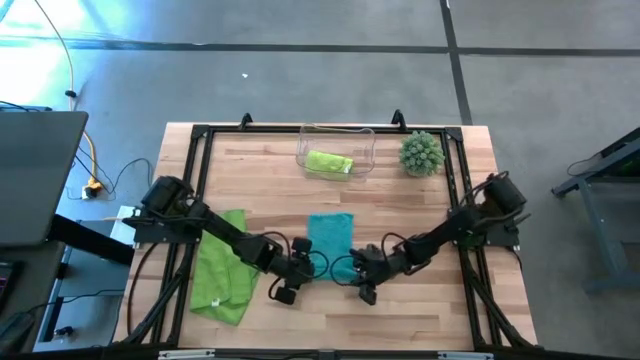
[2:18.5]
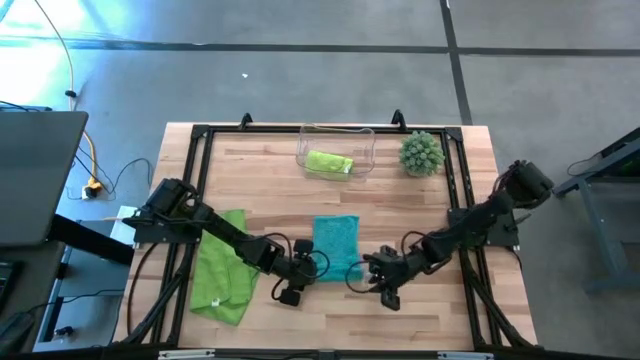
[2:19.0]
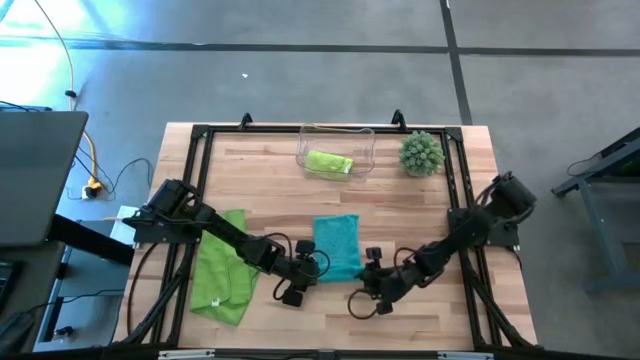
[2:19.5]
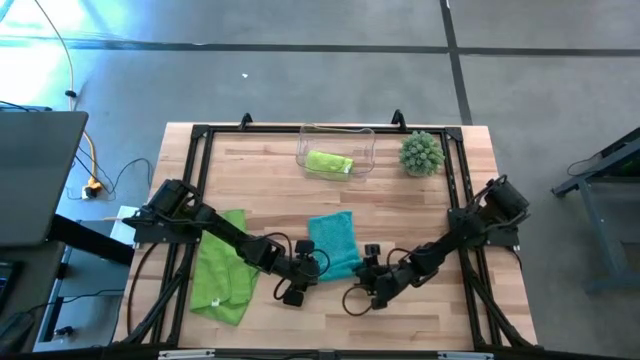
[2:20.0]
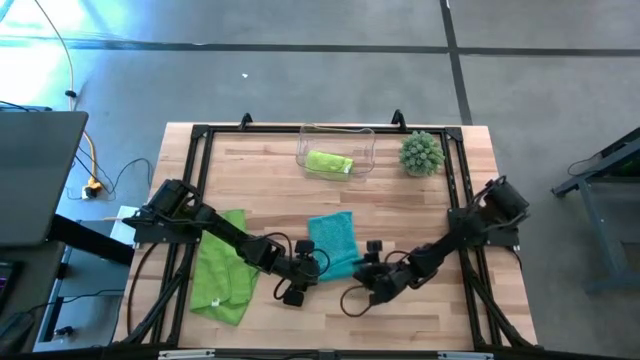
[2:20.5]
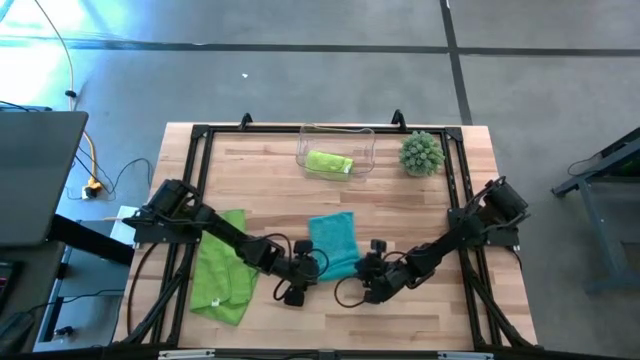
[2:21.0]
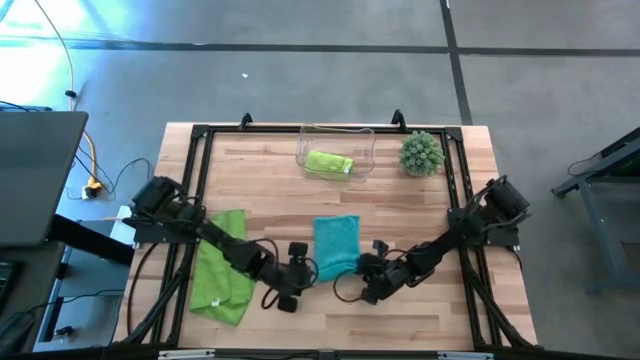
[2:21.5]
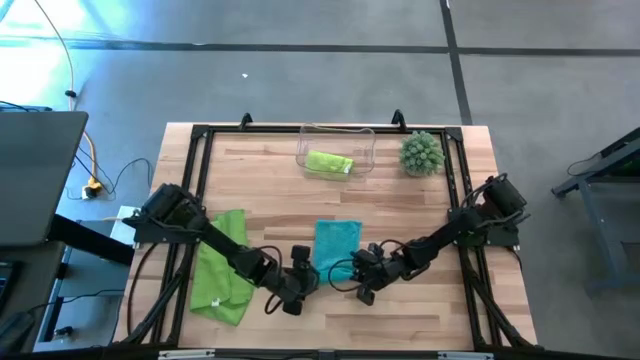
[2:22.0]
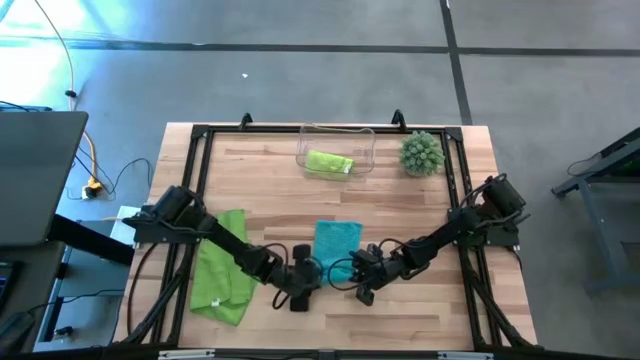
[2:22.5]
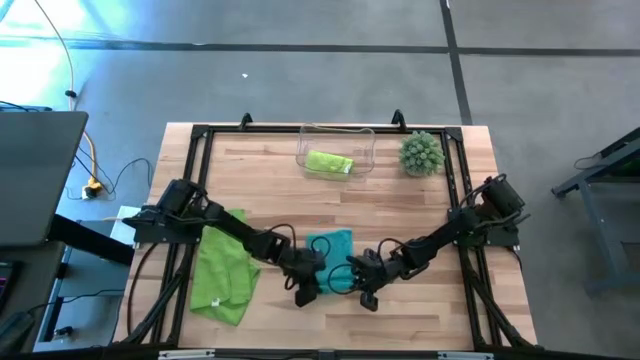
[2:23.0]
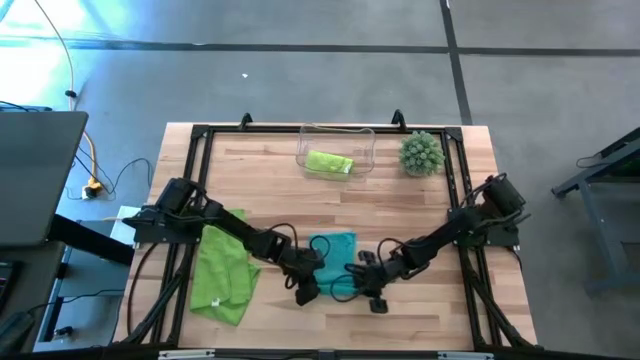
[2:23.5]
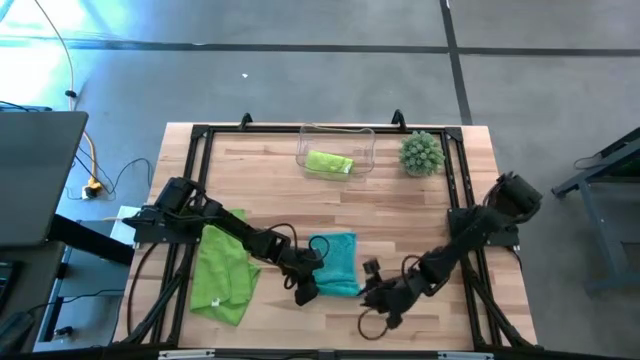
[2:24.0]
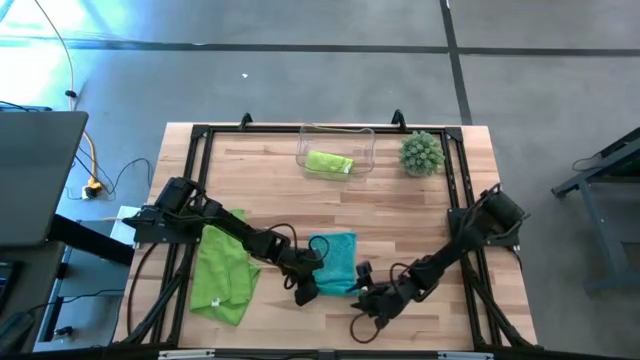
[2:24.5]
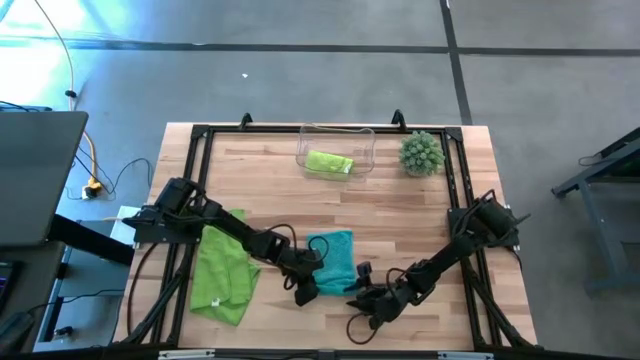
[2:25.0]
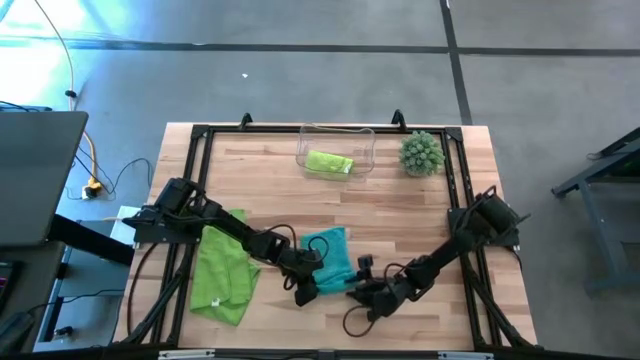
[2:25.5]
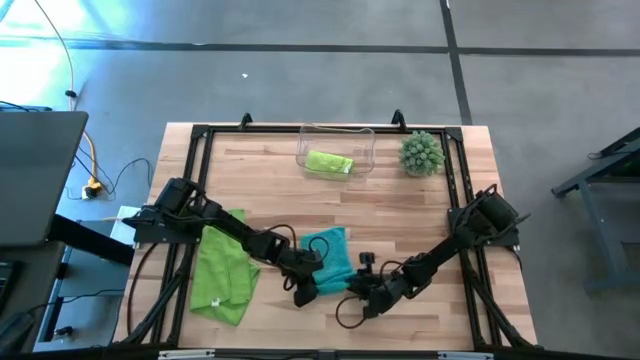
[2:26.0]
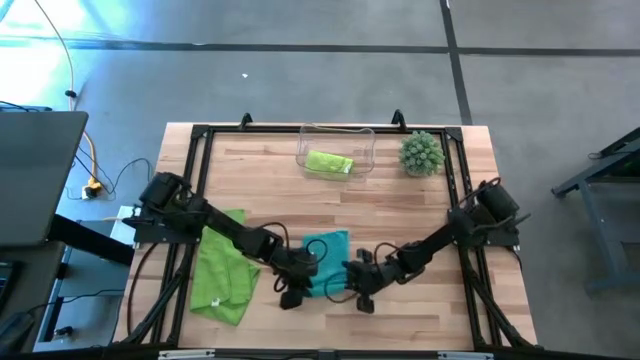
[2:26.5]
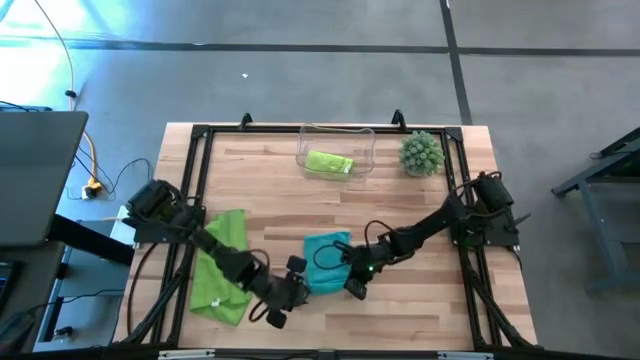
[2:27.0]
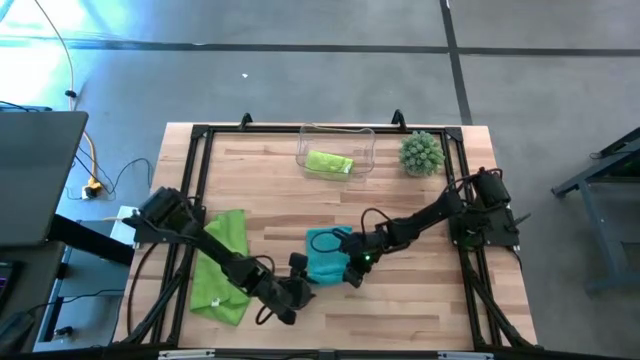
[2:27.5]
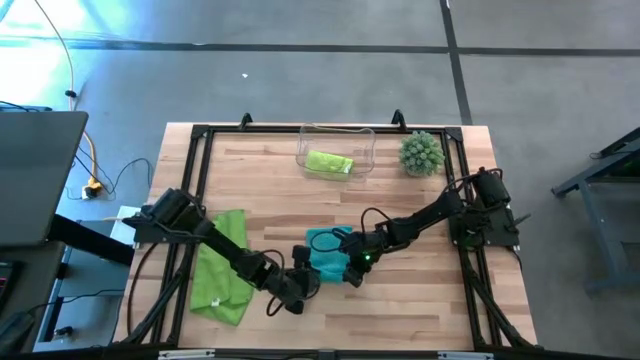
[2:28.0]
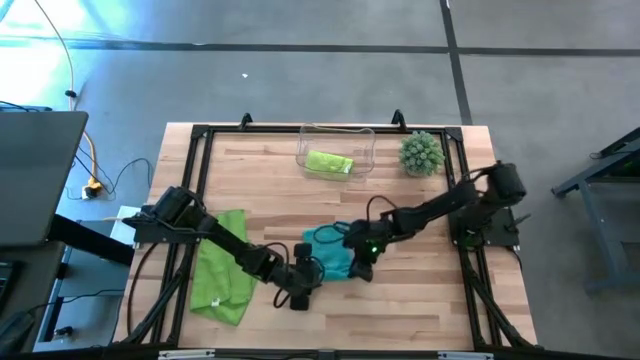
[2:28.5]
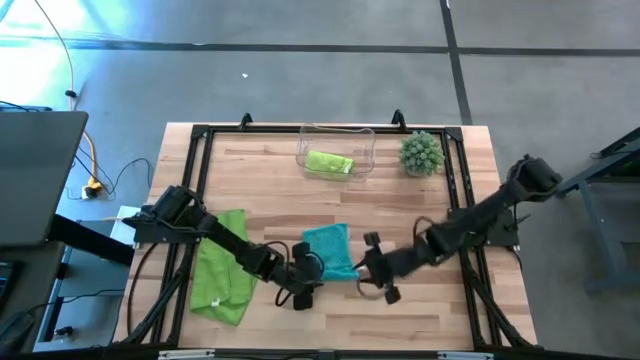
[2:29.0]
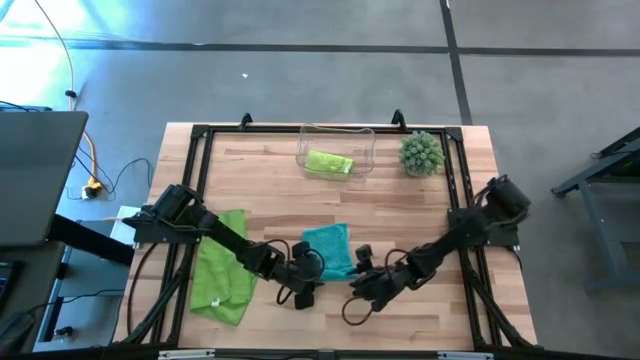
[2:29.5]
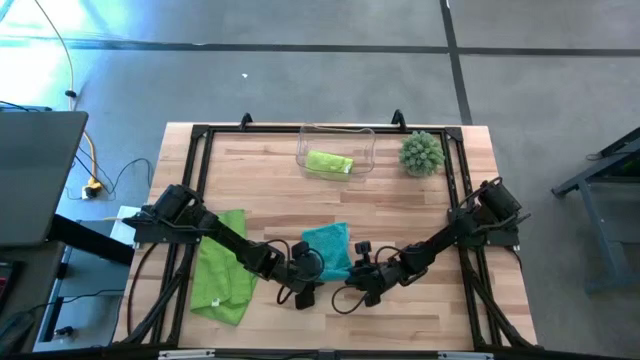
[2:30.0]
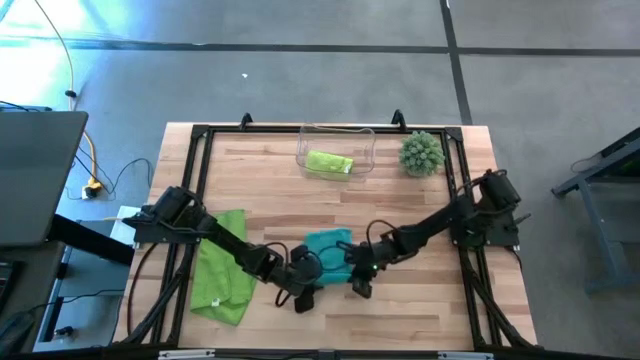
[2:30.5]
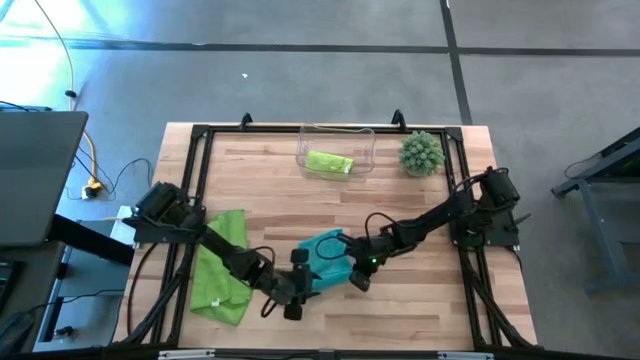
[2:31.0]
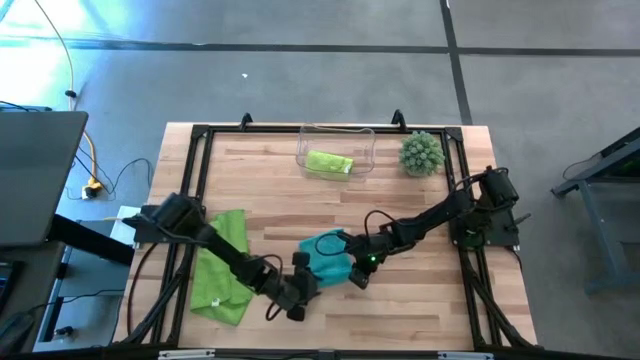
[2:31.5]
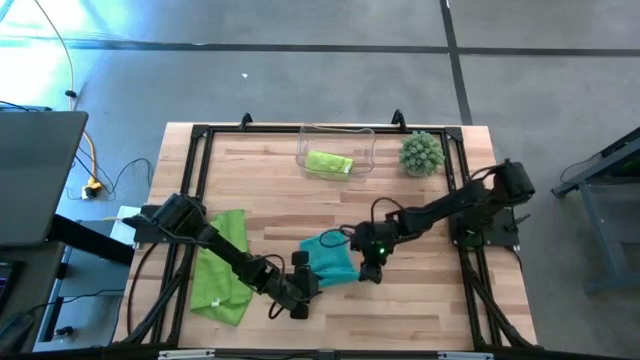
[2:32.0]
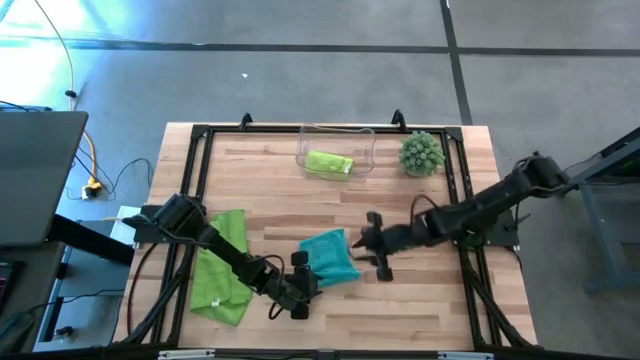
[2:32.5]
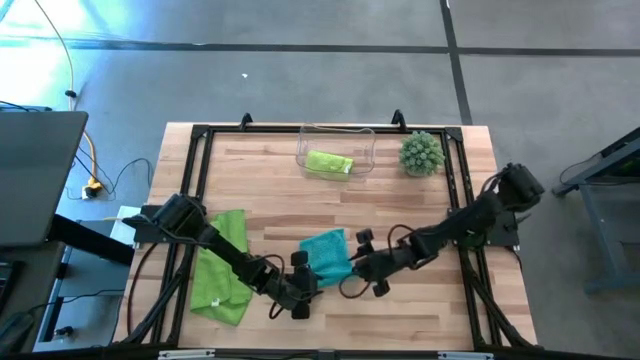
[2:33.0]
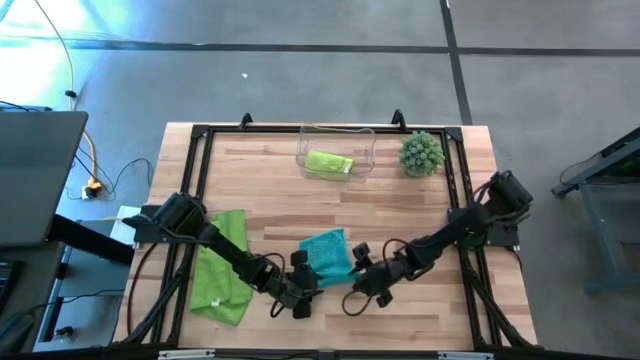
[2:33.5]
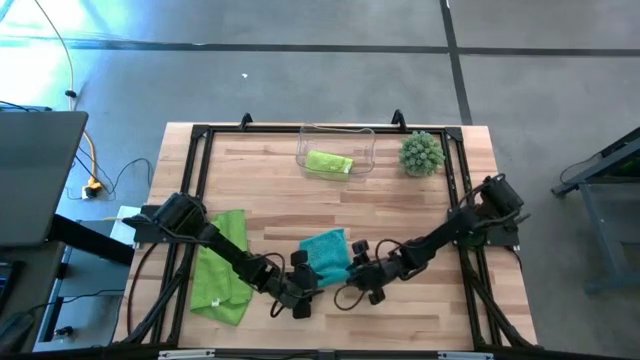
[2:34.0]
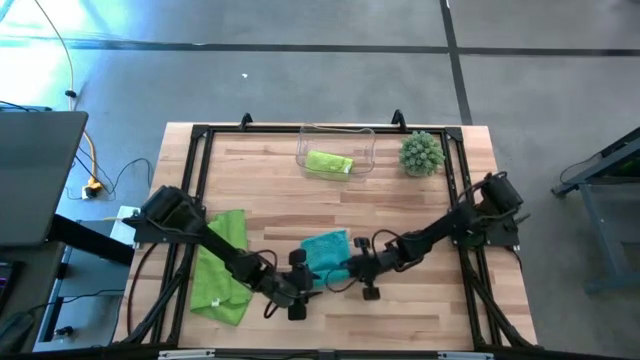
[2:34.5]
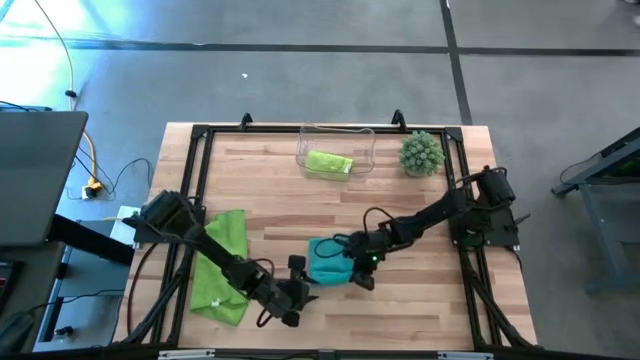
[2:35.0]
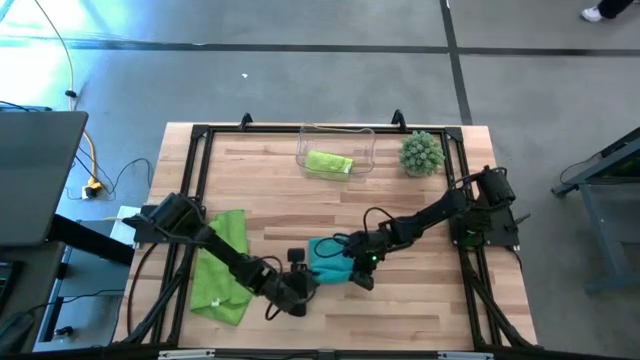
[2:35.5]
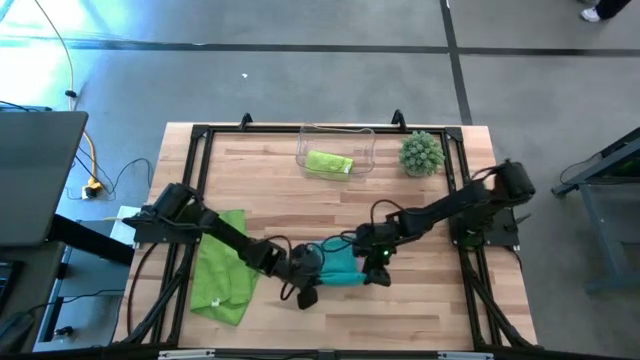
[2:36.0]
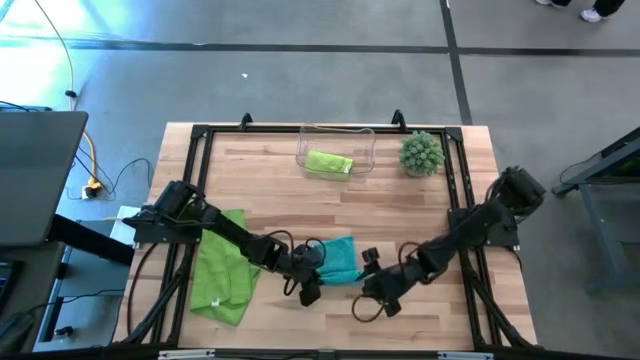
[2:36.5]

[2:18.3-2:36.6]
Task: Roll microfiber towels into tight, uniform cylinder then place into a basket
Roll the blue microfiber cloth

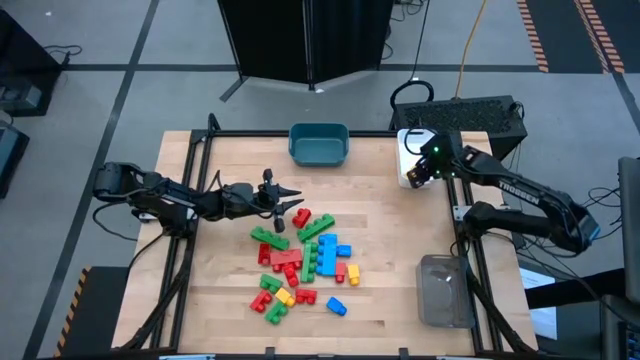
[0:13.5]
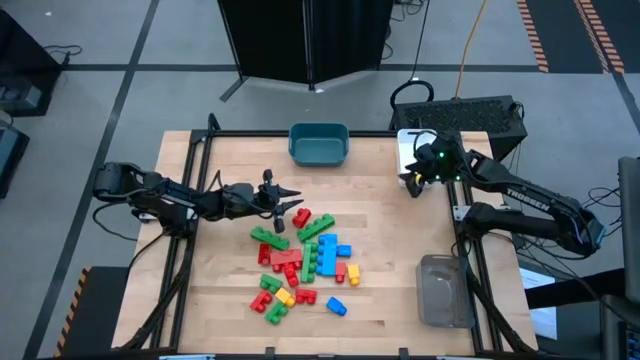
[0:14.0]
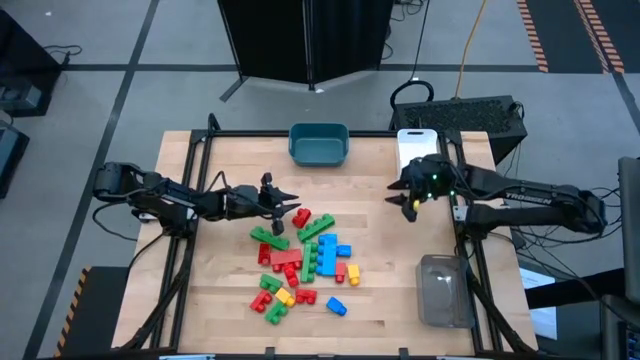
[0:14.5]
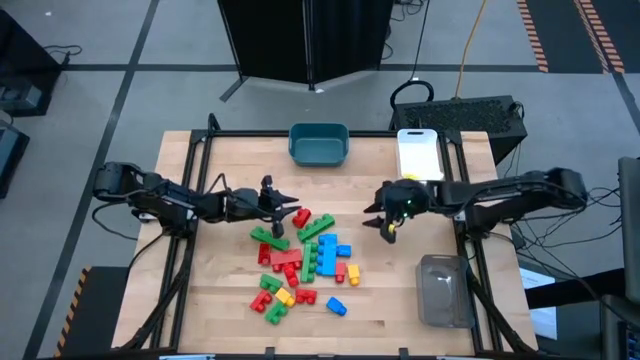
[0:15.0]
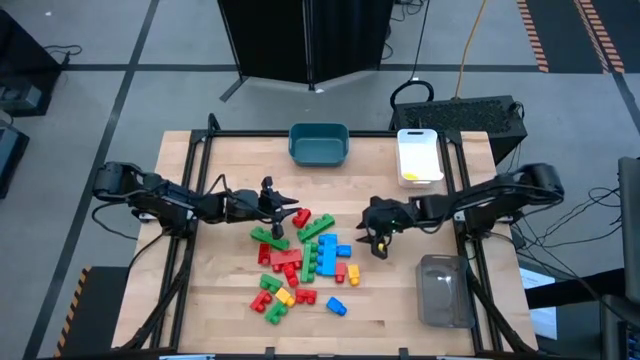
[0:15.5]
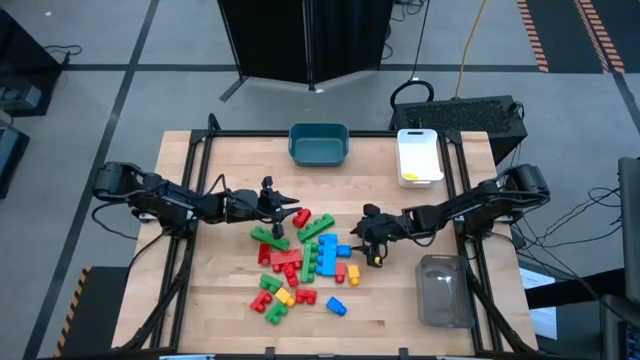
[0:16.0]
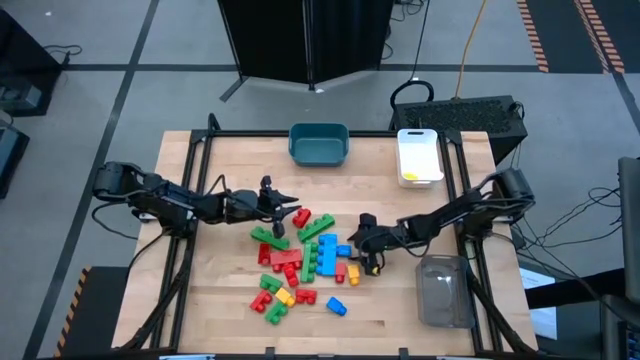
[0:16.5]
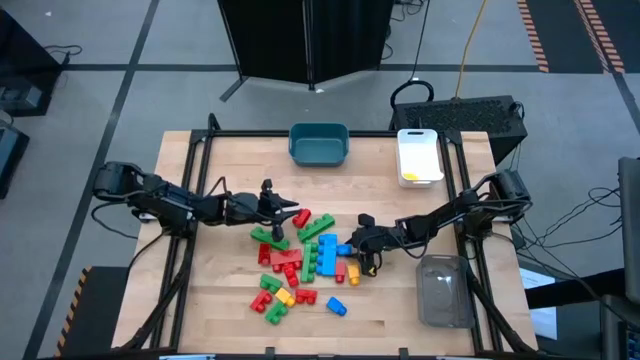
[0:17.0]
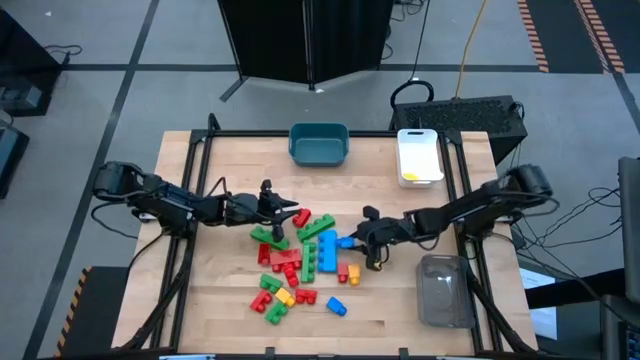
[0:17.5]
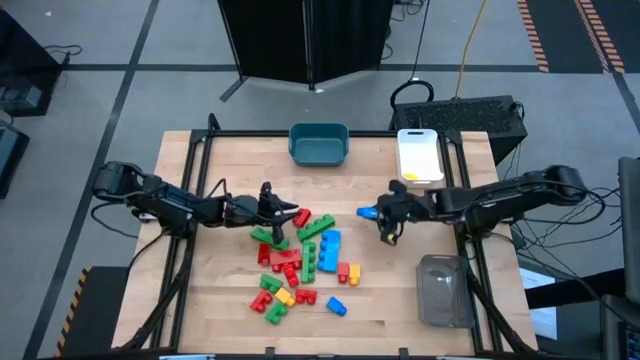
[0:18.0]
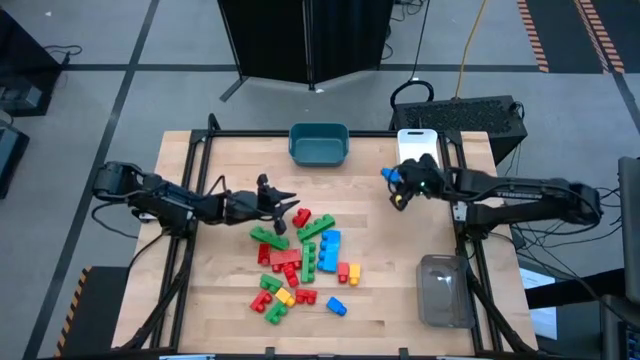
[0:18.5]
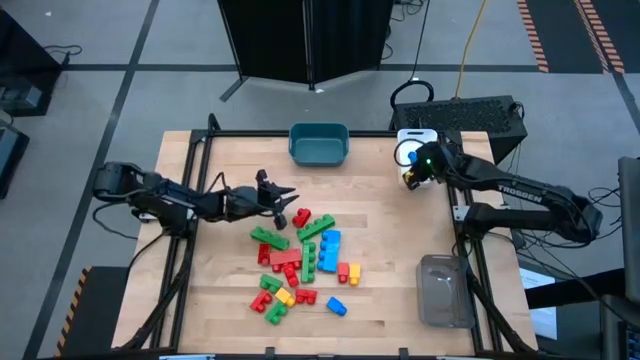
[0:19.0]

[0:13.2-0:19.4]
Task: Sort blocks by size
Put the one stud blue game piece into the white bin
